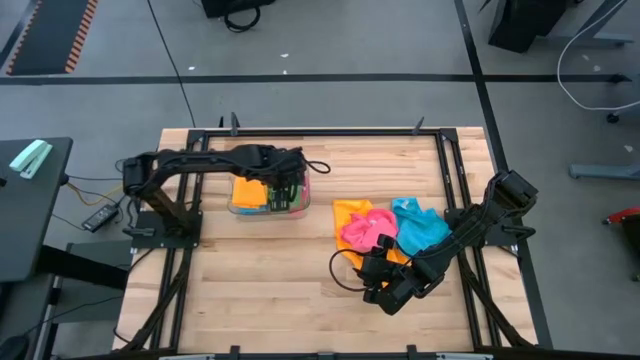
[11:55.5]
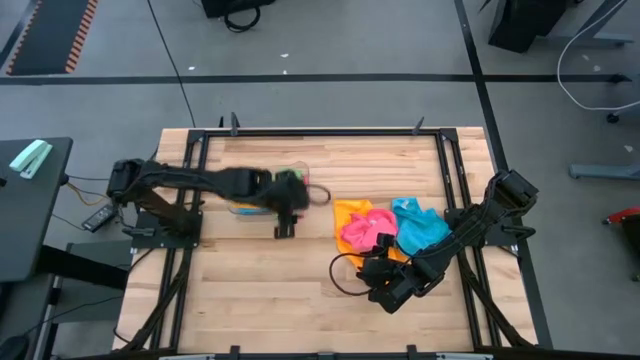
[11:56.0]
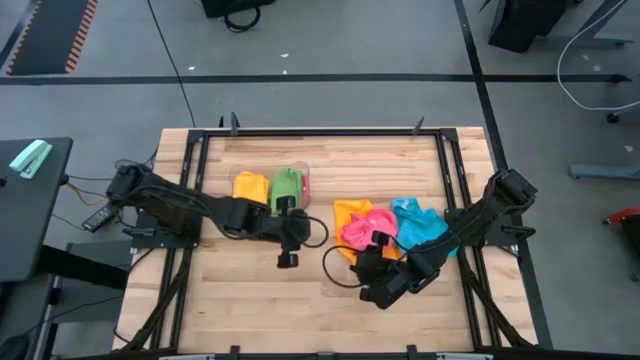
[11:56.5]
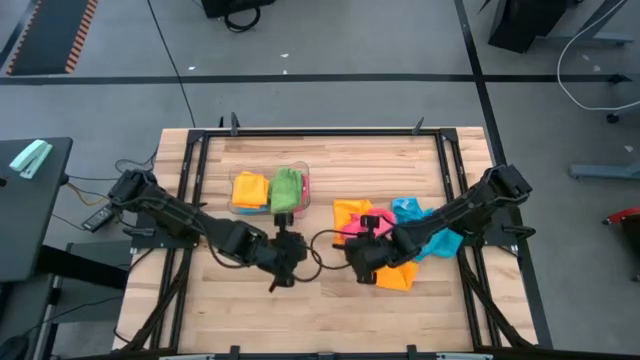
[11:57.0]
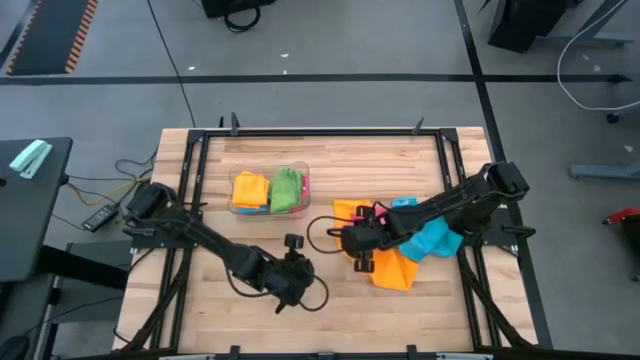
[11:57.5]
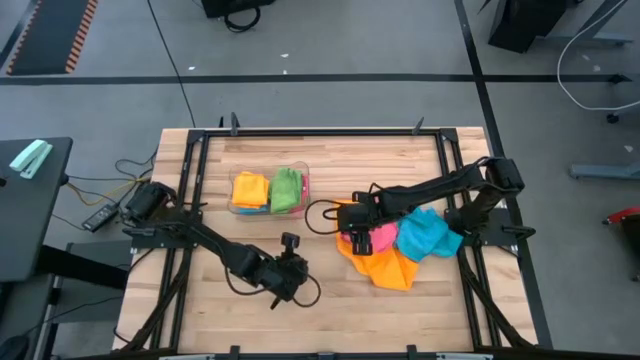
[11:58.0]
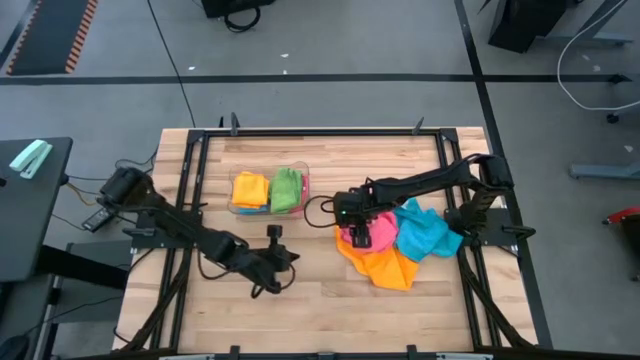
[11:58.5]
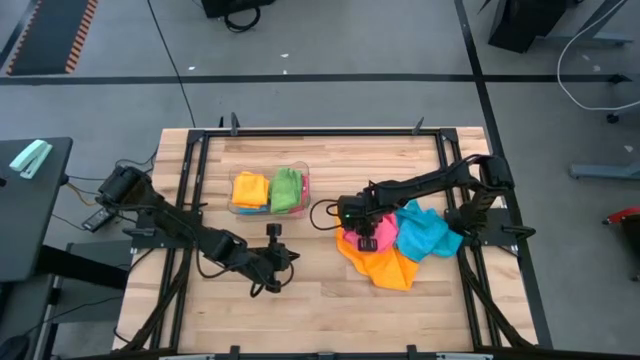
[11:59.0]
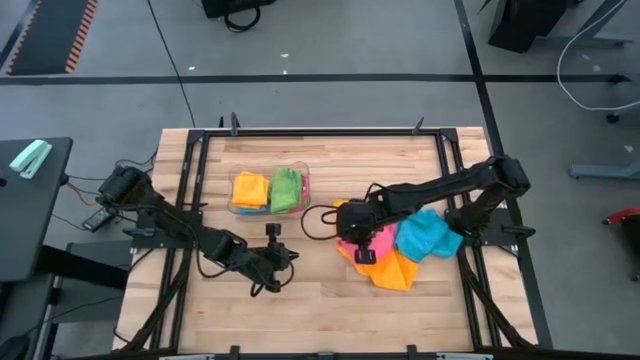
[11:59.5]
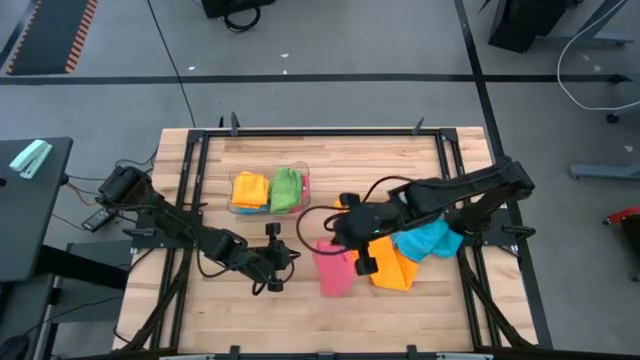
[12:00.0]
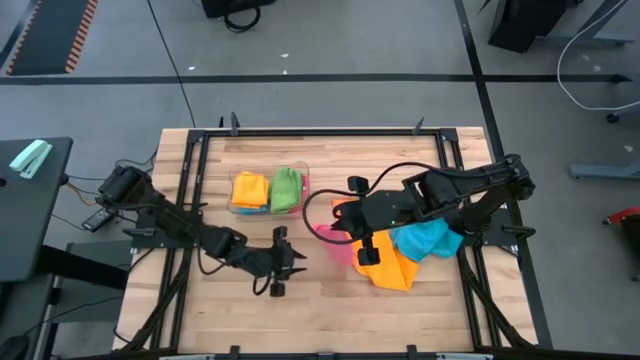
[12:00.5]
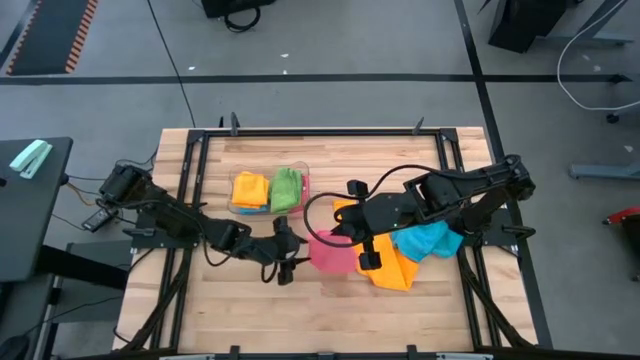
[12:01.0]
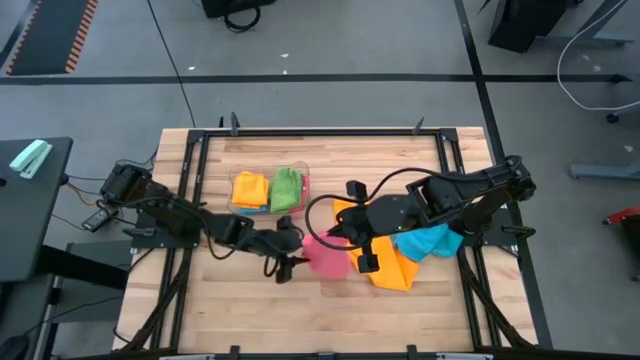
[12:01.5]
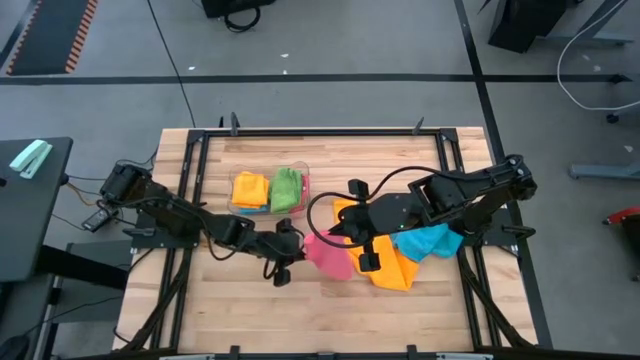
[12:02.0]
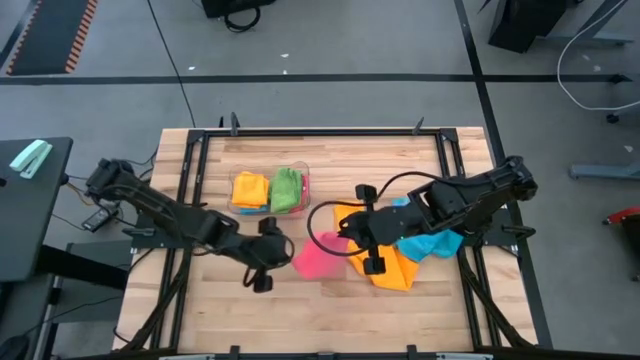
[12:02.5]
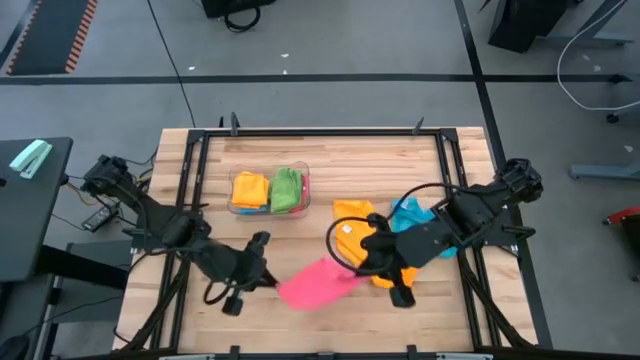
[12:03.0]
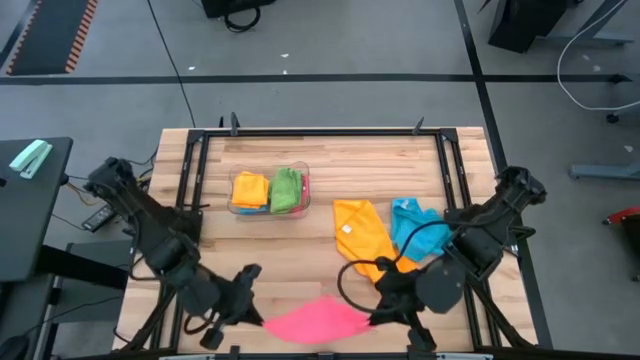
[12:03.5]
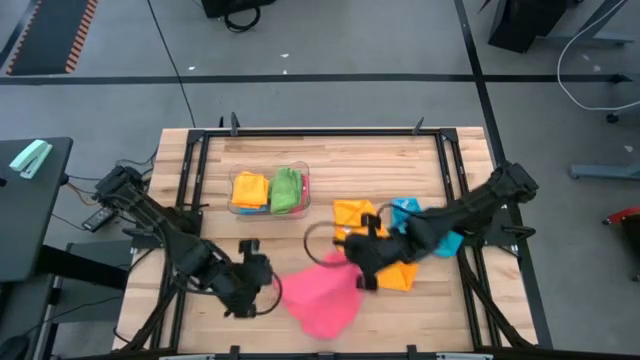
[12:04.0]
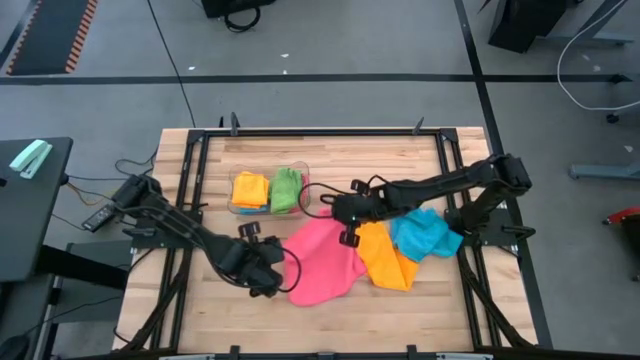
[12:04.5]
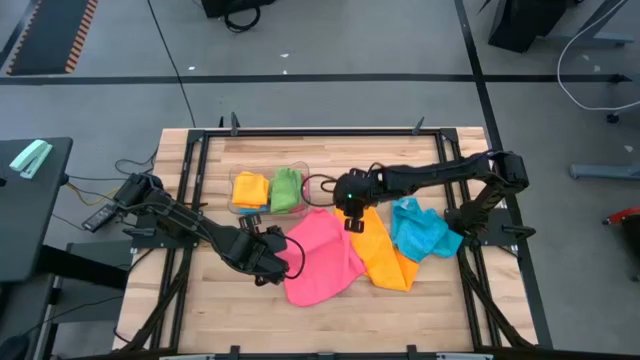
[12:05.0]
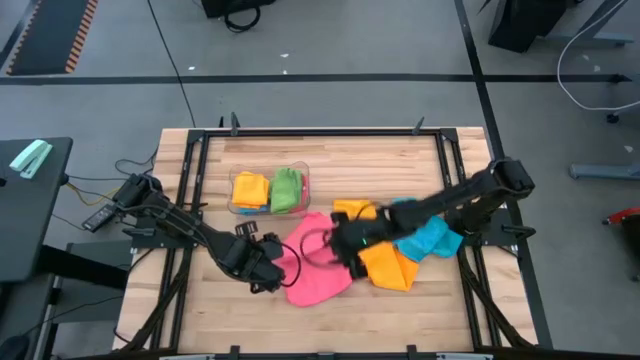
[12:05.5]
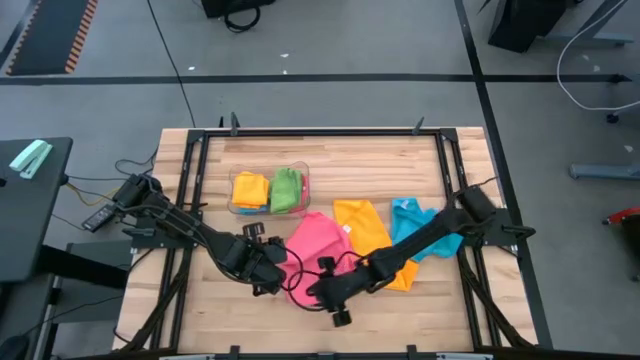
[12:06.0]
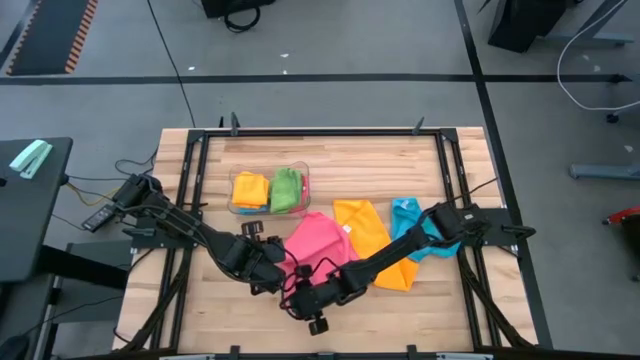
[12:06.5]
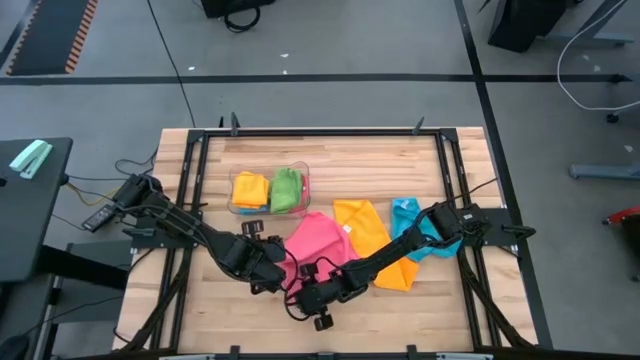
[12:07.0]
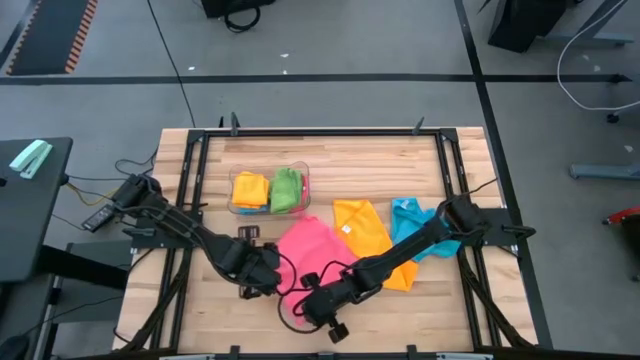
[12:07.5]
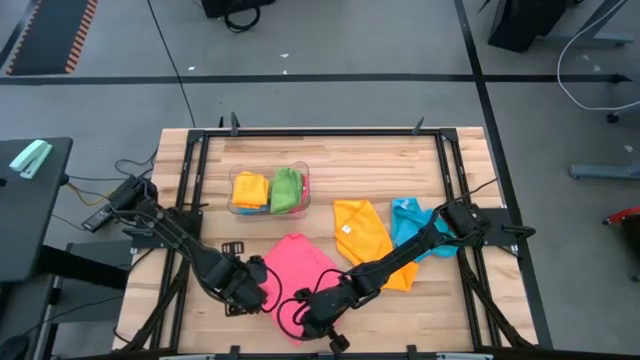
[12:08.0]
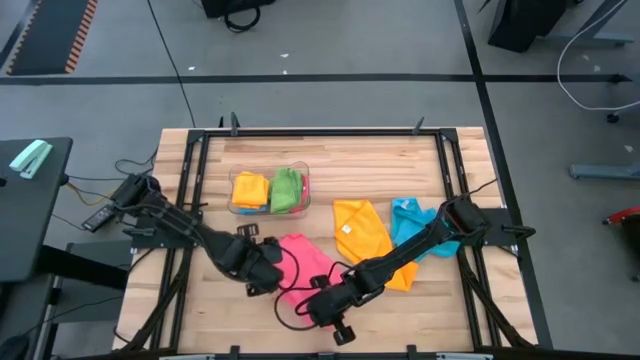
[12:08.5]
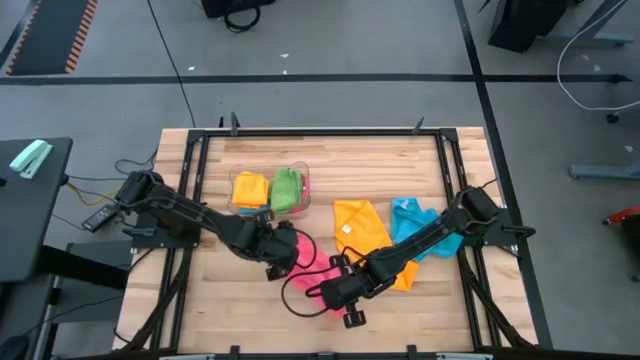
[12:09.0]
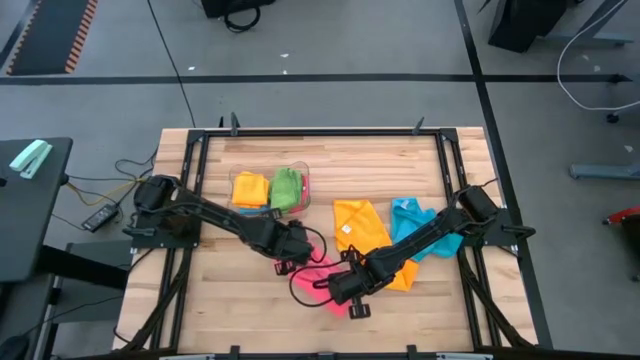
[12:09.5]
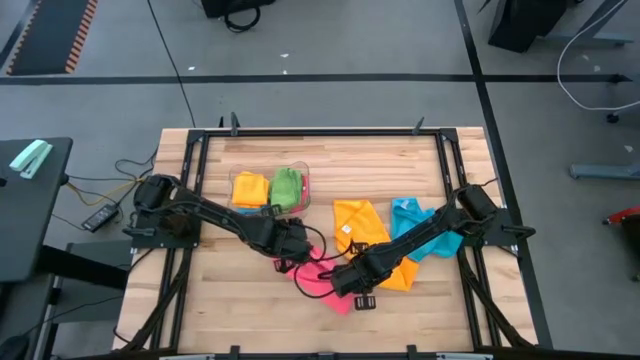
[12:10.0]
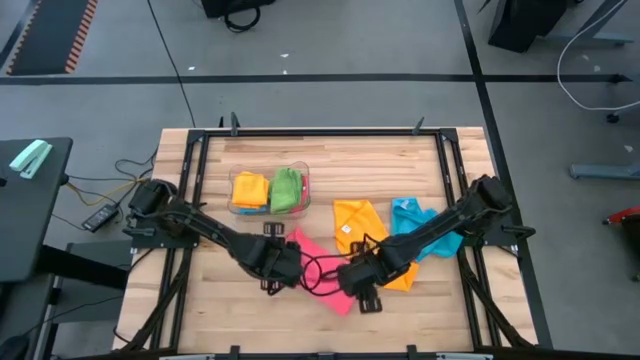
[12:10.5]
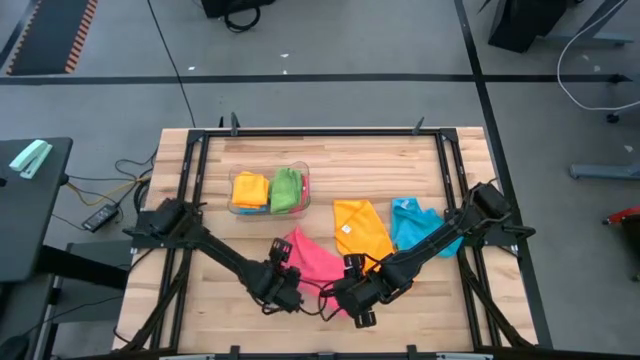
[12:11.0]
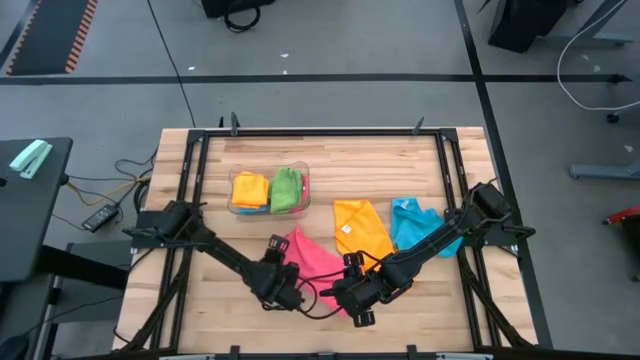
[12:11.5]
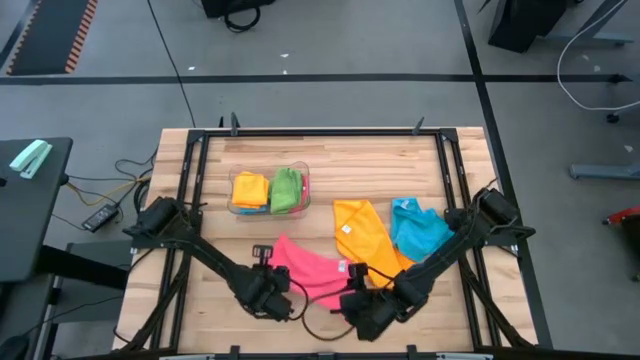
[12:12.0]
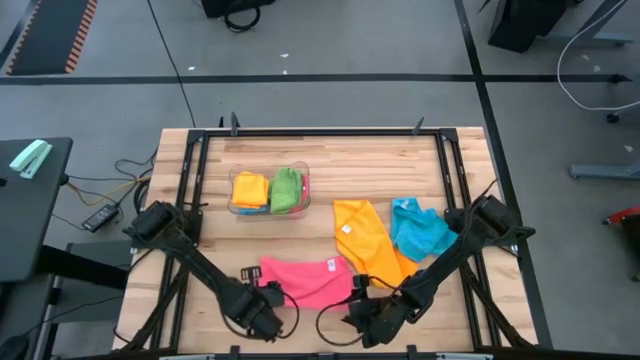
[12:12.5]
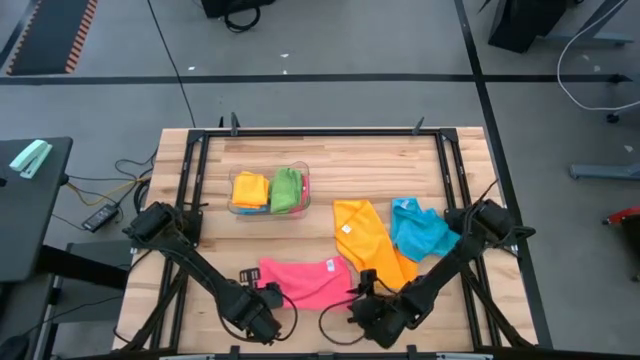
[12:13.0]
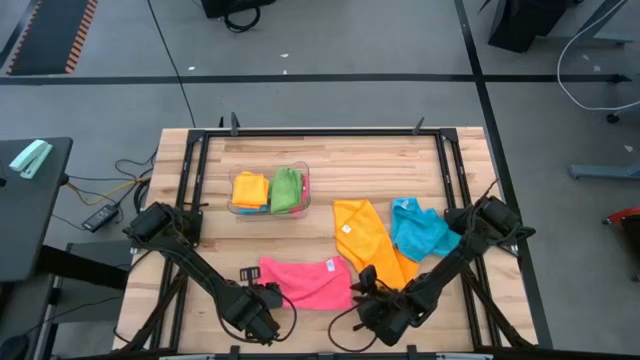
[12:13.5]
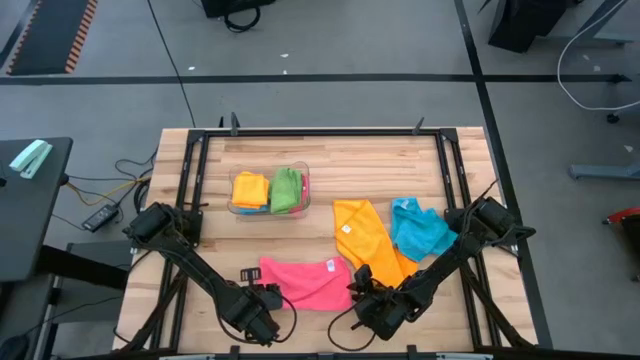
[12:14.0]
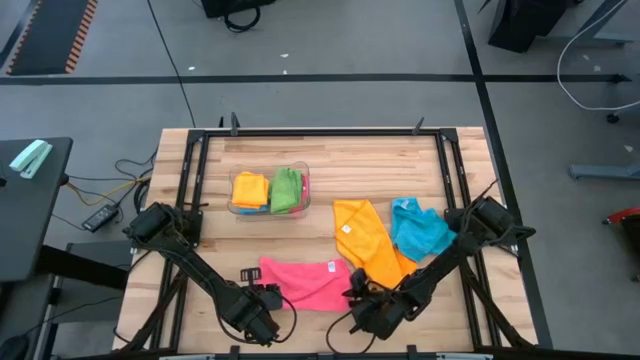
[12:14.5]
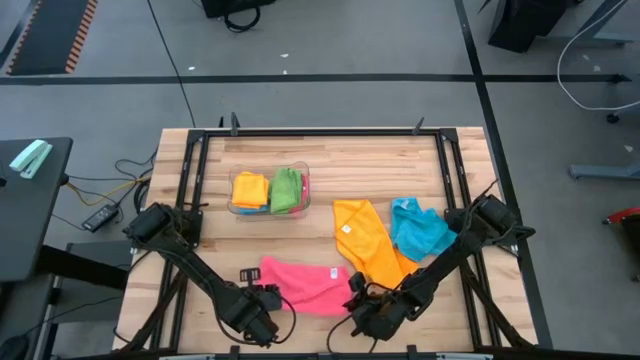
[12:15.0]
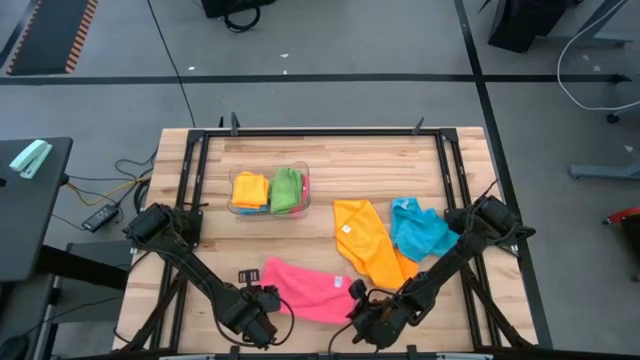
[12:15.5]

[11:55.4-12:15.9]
Task: Fold microfiber towels
Fold the pink microfiber towel
